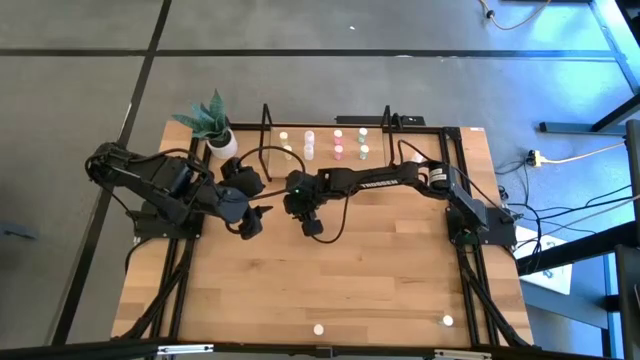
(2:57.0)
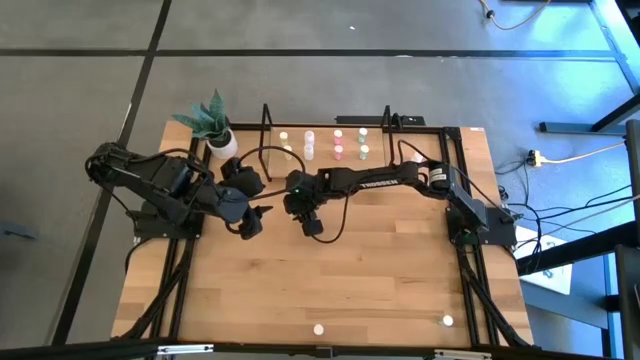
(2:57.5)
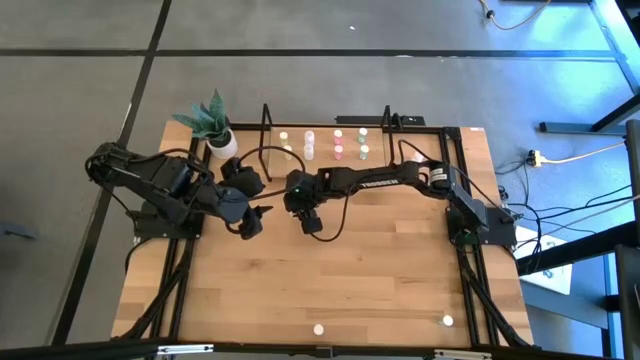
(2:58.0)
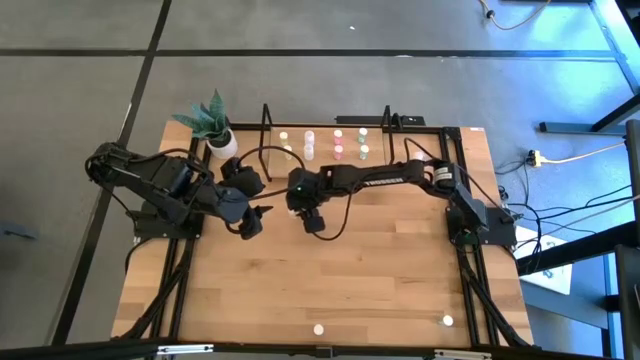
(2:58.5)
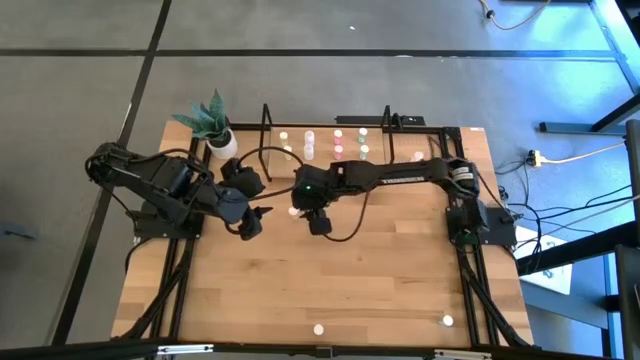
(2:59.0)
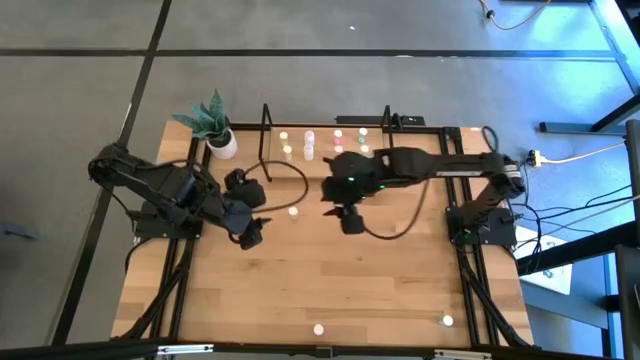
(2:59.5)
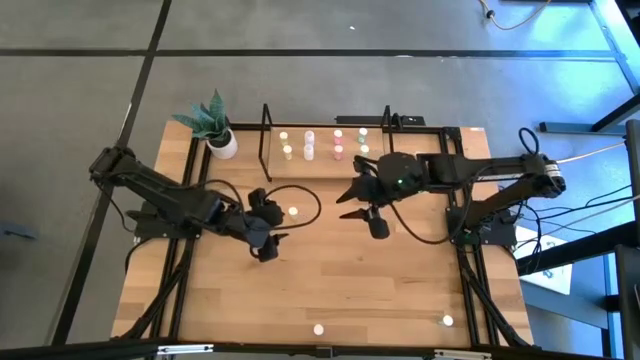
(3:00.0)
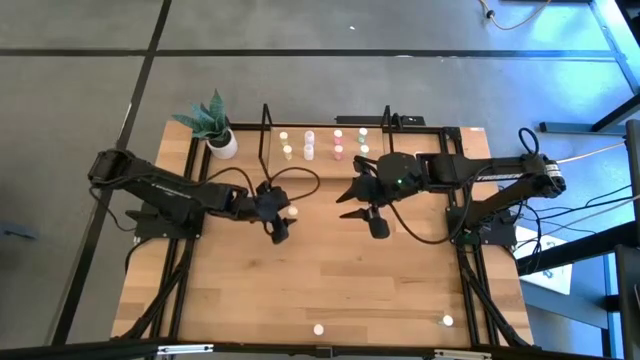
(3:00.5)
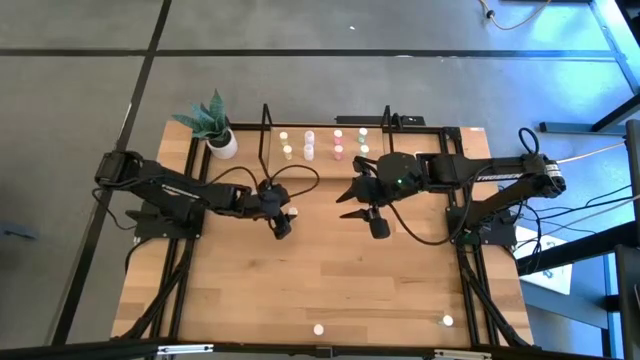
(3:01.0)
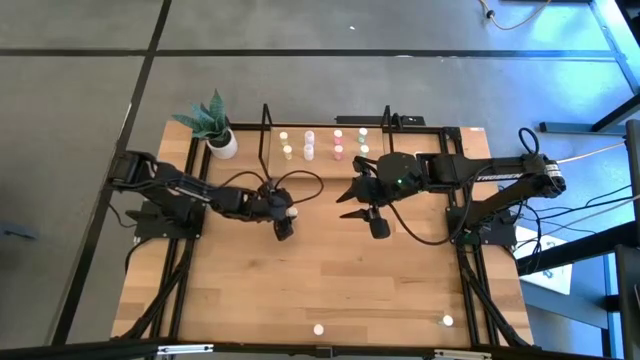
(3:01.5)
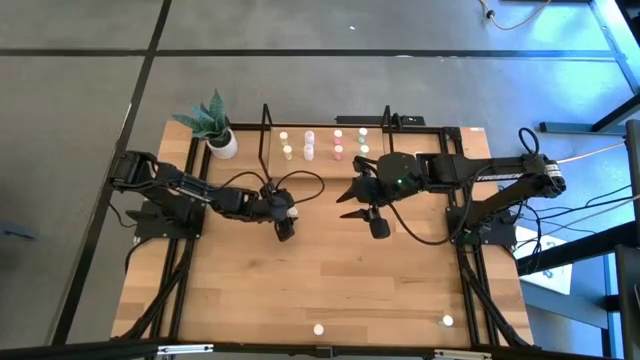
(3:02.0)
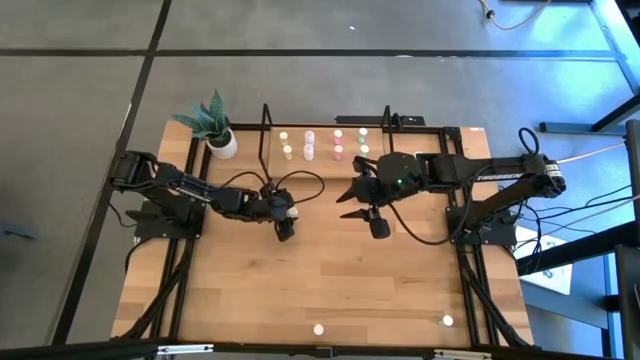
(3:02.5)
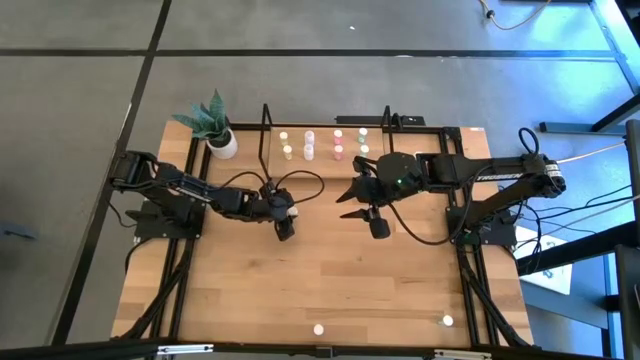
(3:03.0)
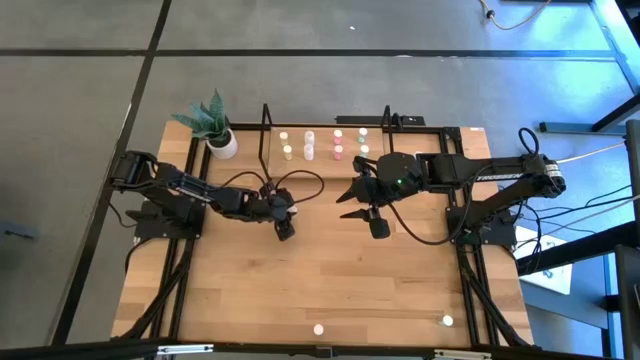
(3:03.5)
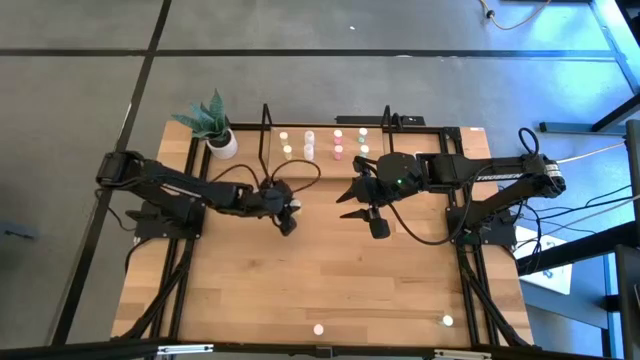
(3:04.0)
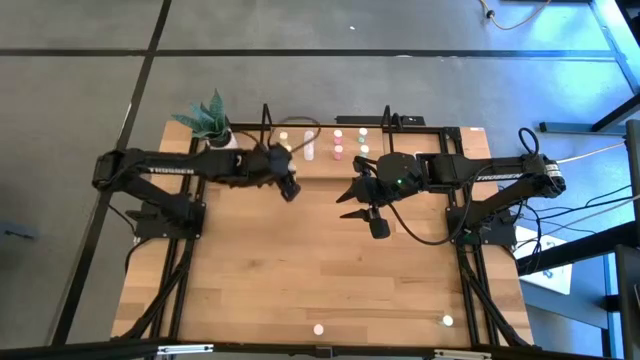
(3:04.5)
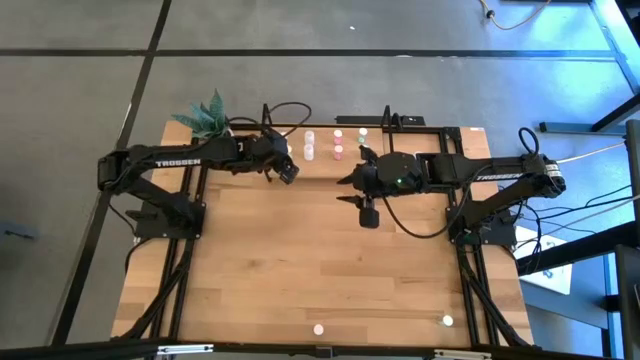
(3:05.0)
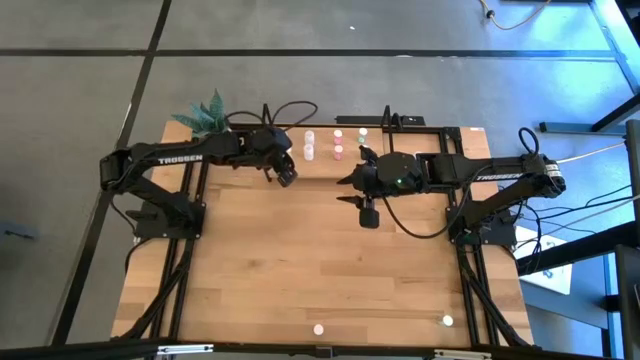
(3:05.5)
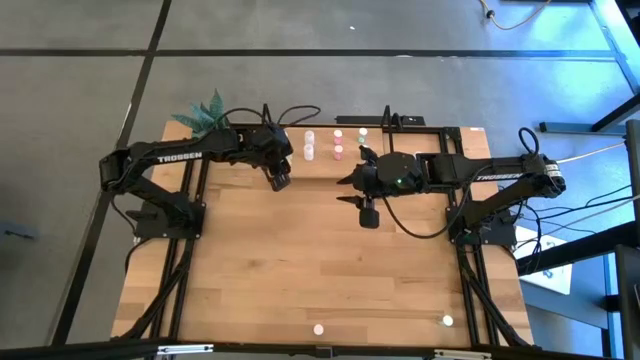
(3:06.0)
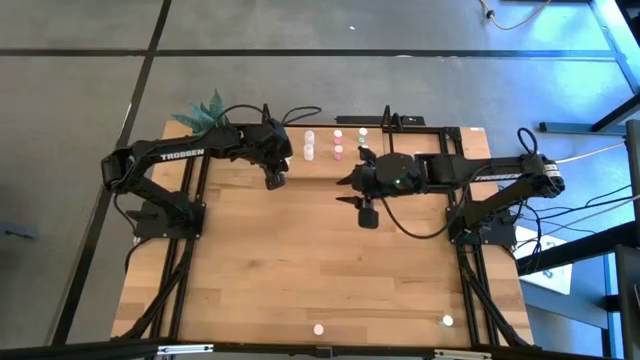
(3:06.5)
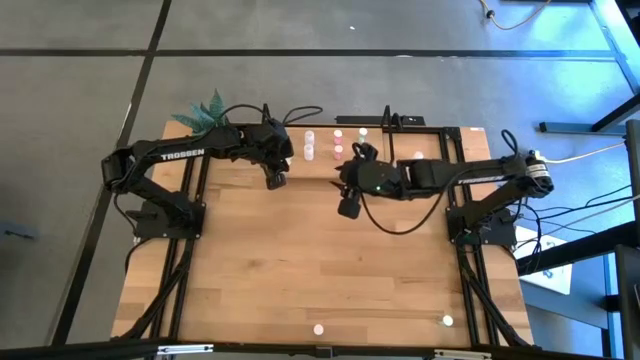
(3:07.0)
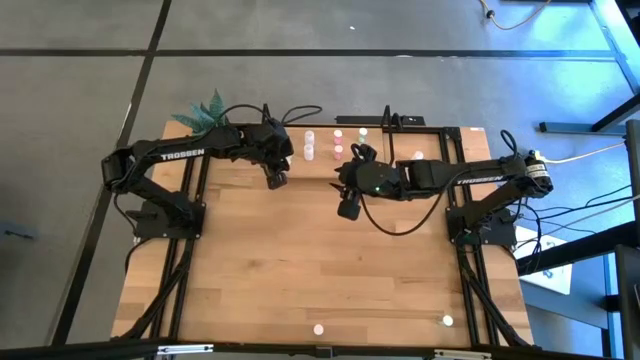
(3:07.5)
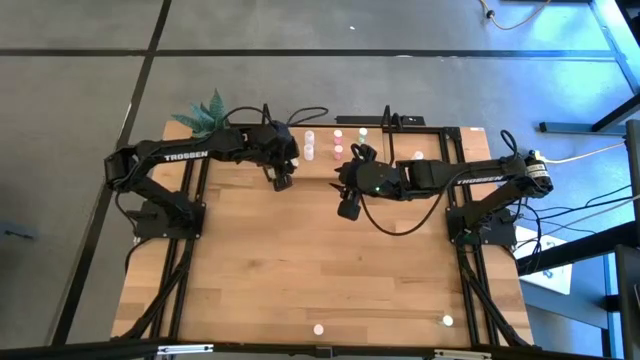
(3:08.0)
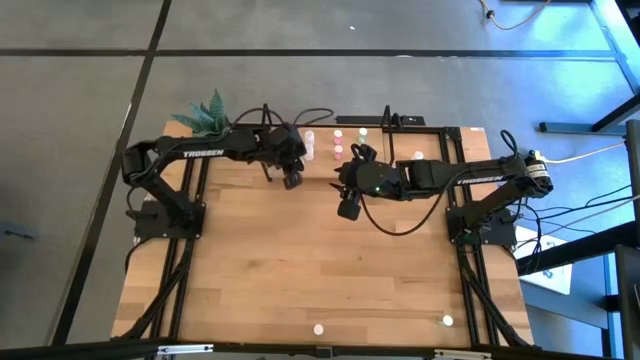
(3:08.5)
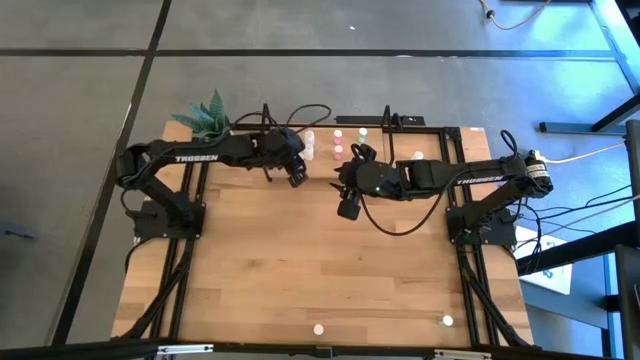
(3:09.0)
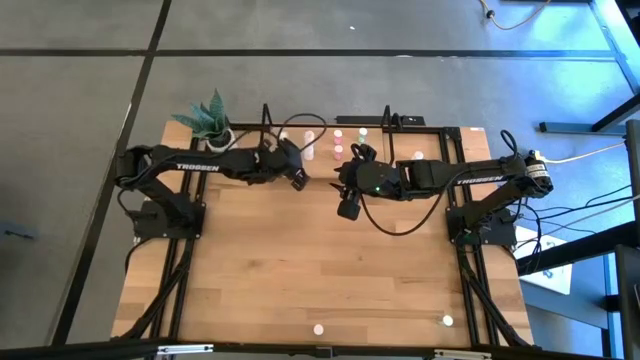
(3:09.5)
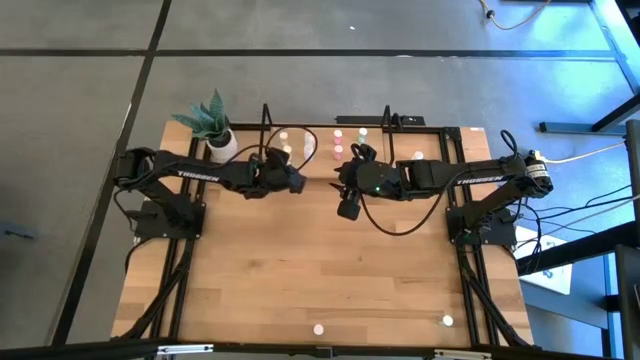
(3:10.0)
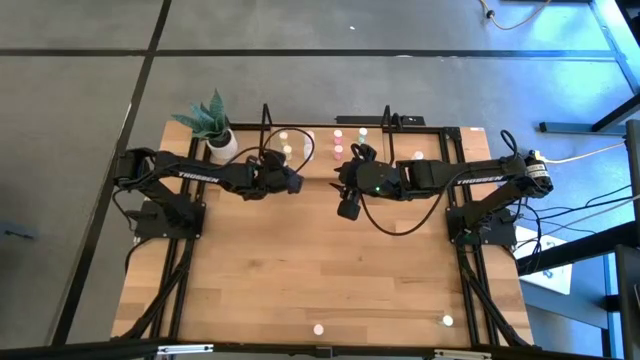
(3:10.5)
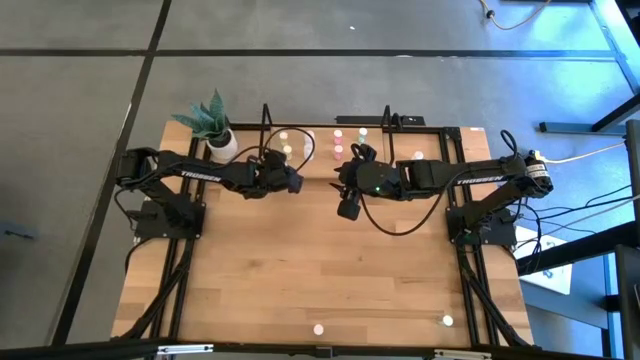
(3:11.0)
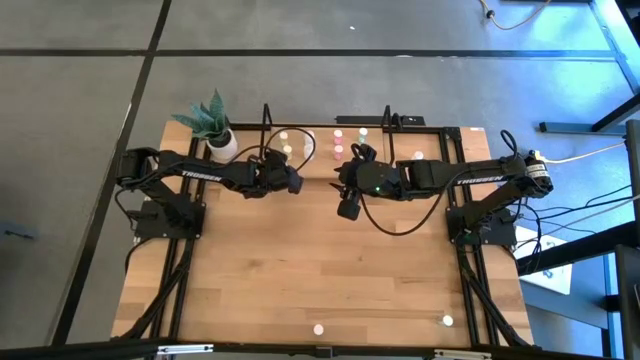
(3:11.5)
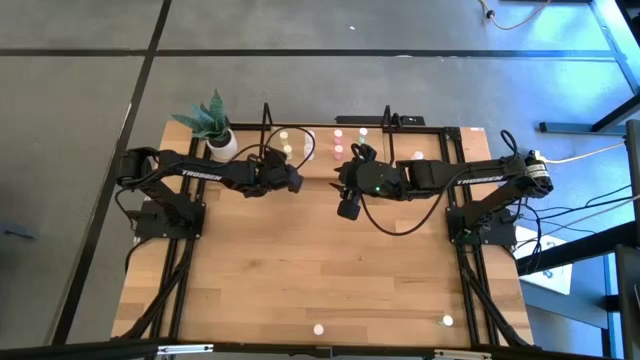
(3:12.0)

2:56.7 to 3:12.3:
Task: Pick and place medicine bottles onto shelf by color
Put the yellow pill bottle on the shelf aligned with the other yellow pill bottles

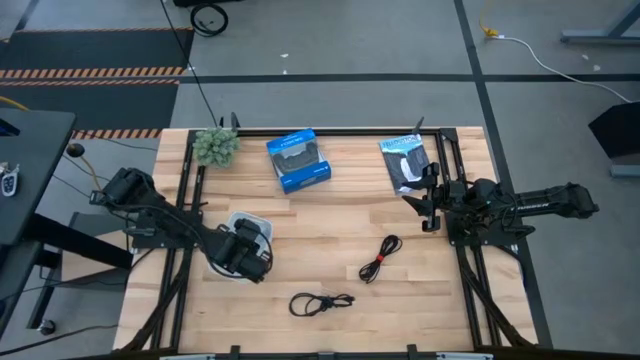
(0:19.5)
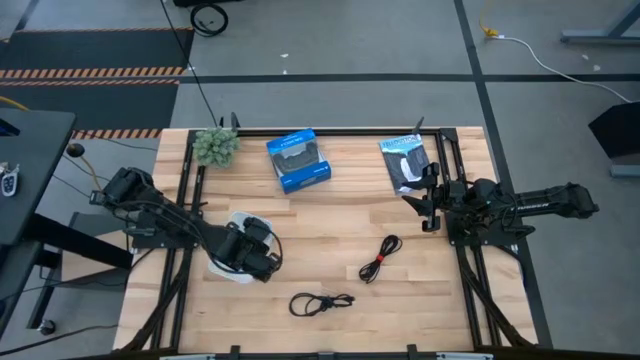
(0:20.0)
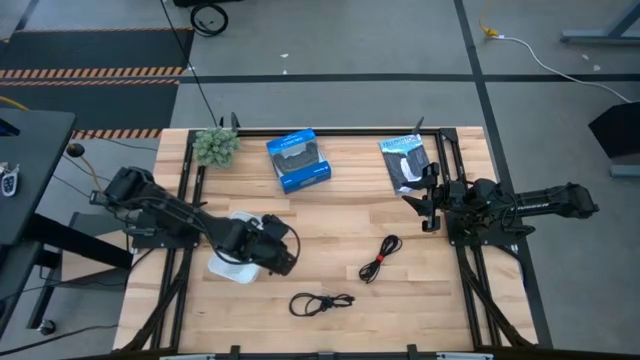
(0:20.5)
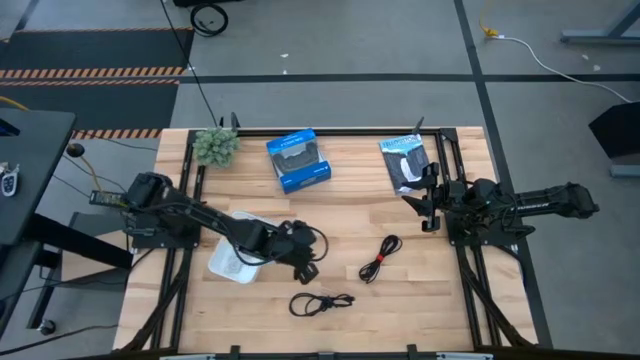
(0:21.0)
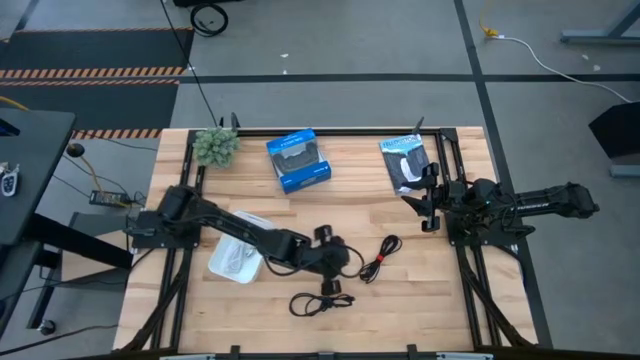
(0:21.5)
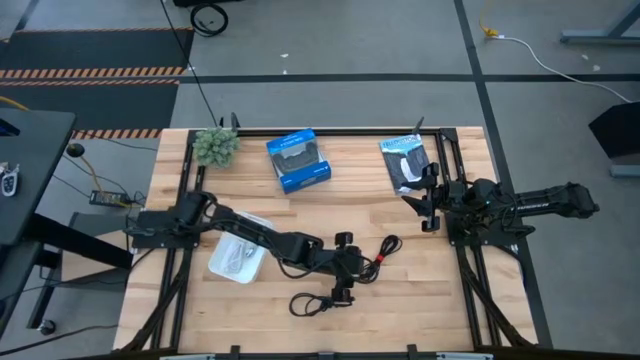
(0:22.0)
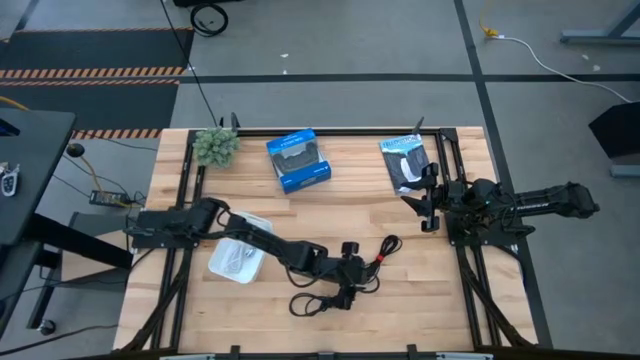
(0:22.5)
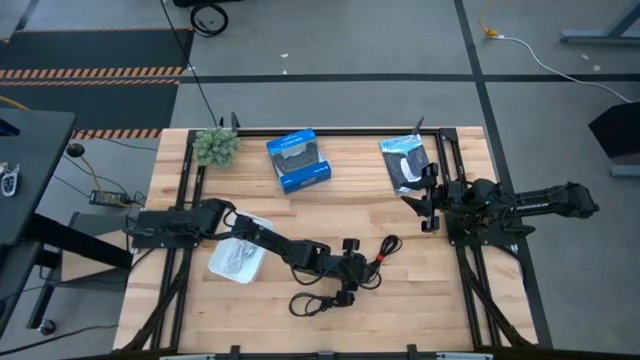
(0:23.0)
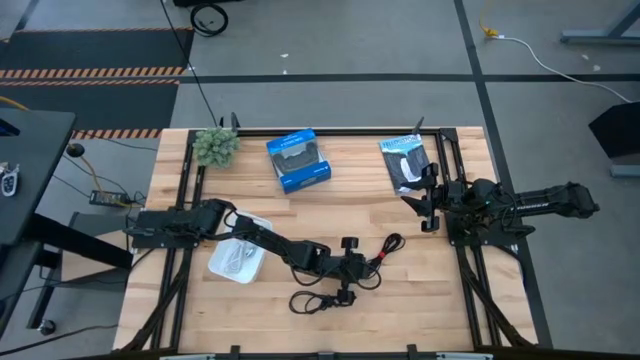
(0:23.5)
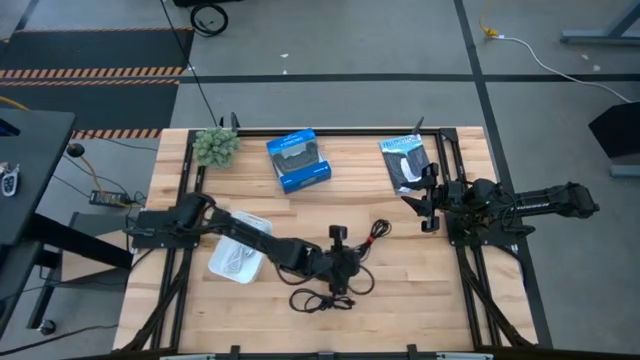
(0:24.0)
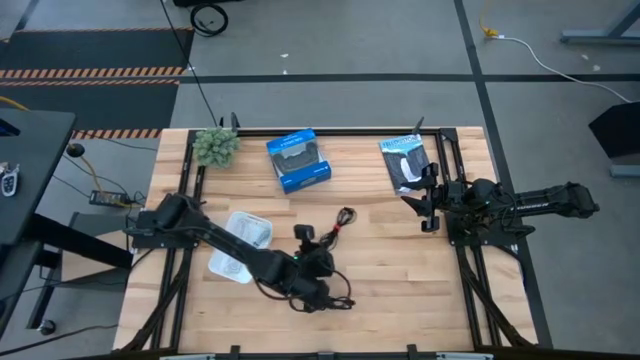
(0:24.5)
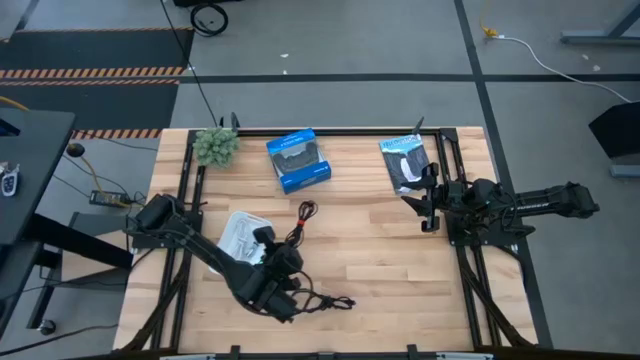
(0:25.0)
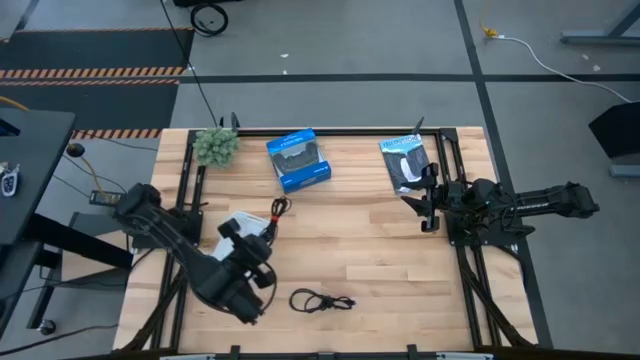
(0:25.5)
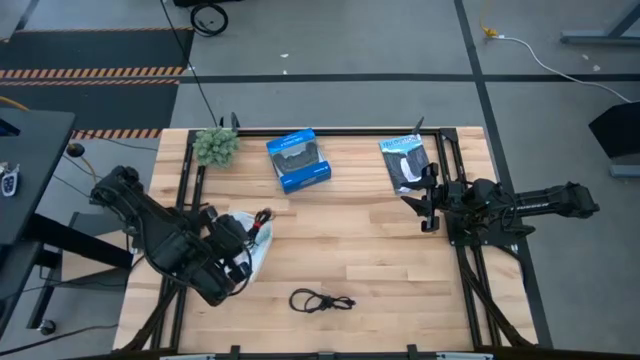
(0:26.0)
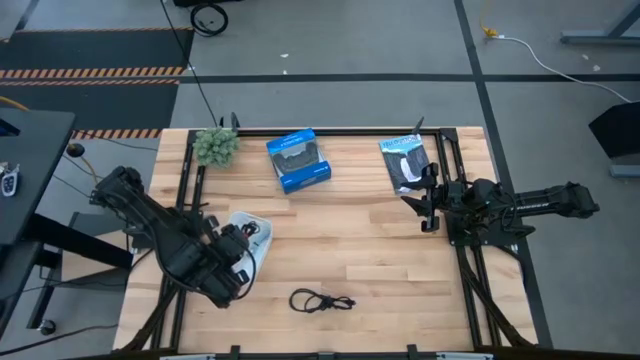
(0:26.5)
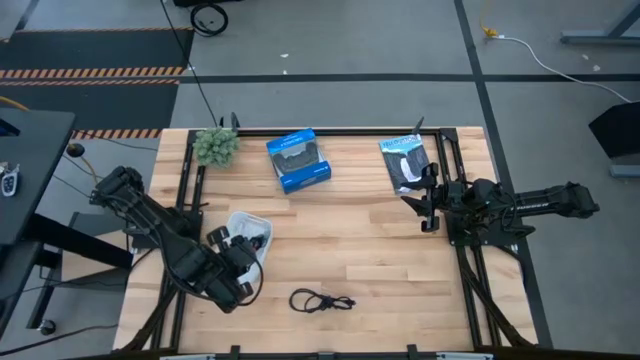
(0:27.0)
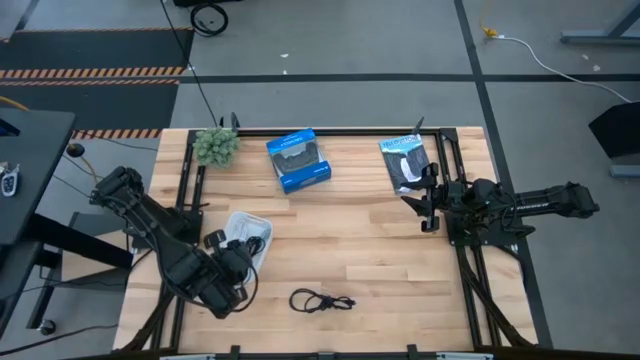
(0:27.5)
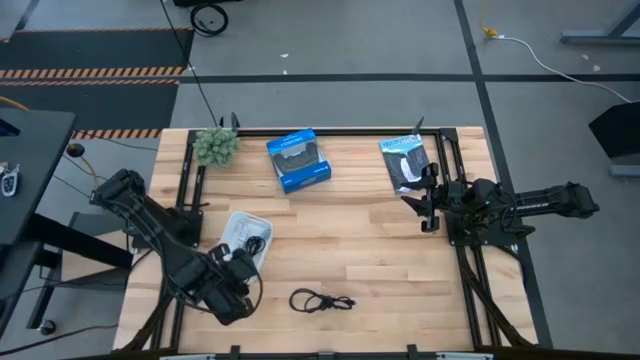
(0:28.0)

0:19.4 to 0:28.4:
Task: Pick and place USB-C Cables
Put the black charger cable into the white bin
